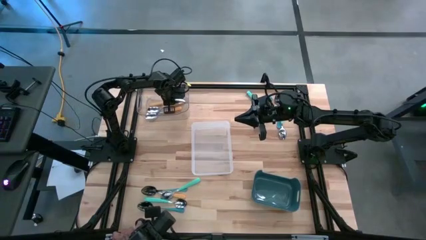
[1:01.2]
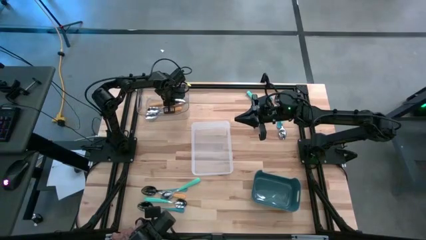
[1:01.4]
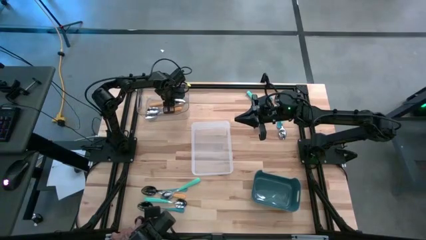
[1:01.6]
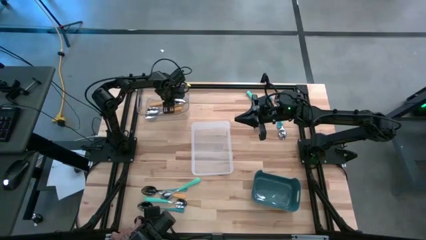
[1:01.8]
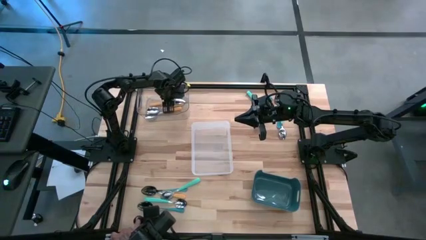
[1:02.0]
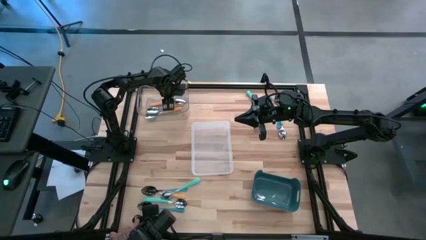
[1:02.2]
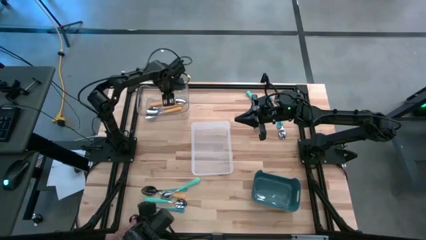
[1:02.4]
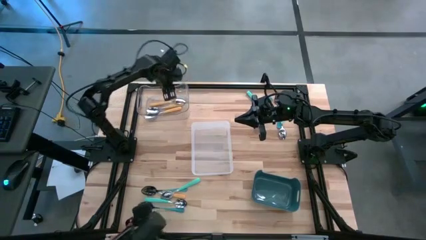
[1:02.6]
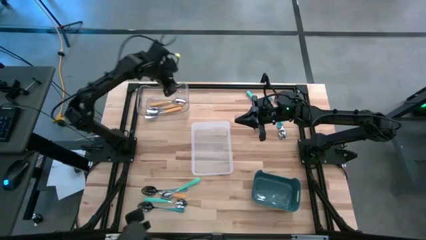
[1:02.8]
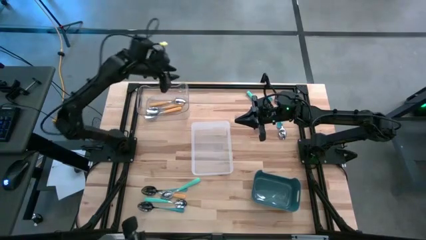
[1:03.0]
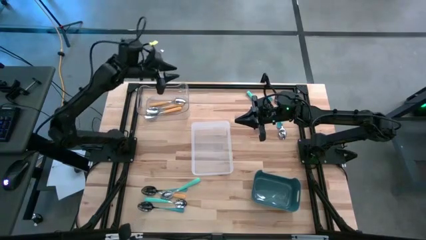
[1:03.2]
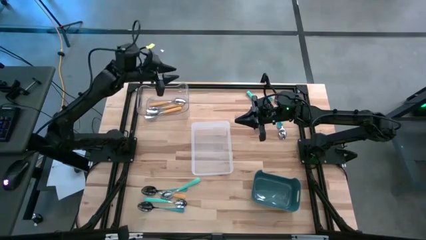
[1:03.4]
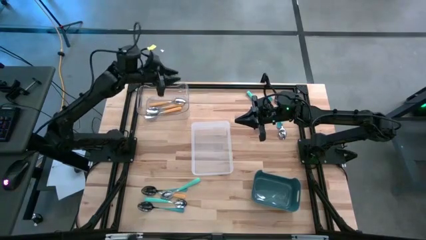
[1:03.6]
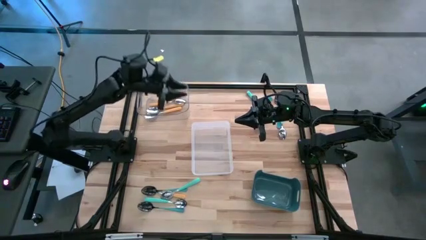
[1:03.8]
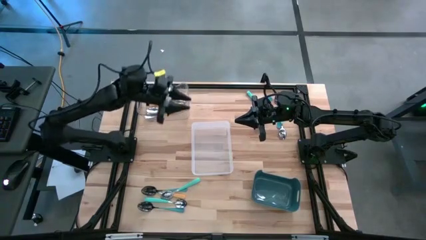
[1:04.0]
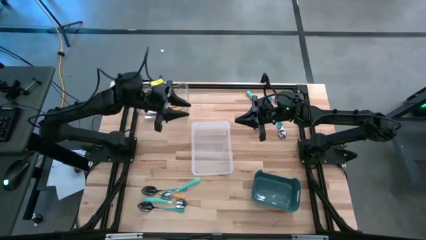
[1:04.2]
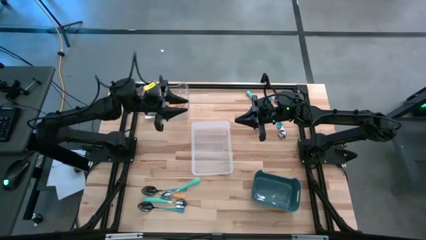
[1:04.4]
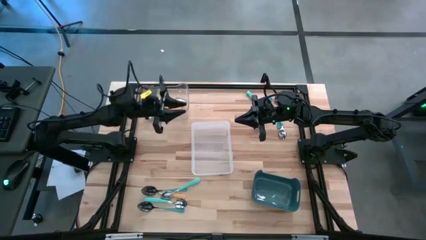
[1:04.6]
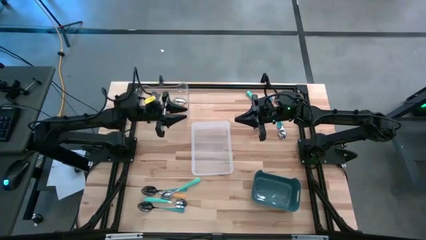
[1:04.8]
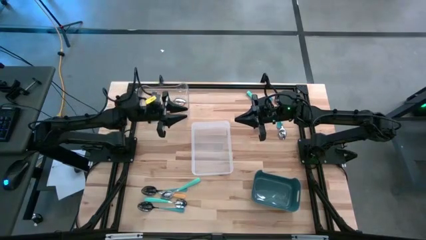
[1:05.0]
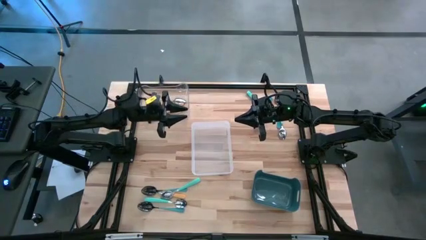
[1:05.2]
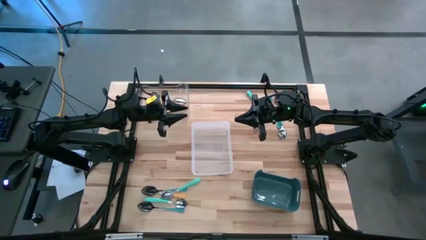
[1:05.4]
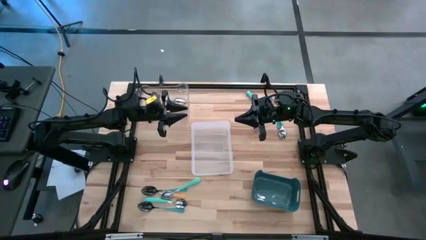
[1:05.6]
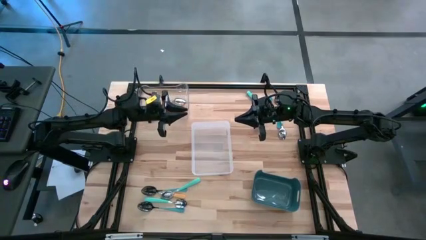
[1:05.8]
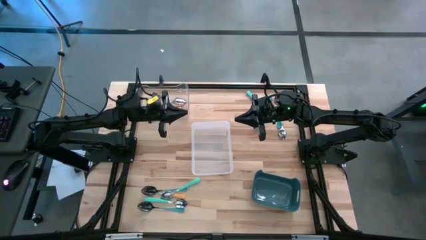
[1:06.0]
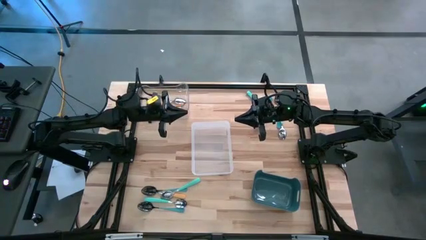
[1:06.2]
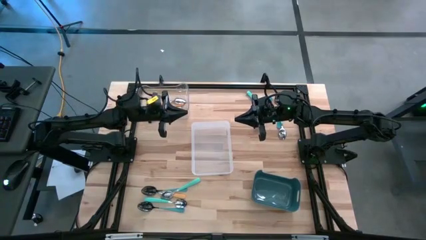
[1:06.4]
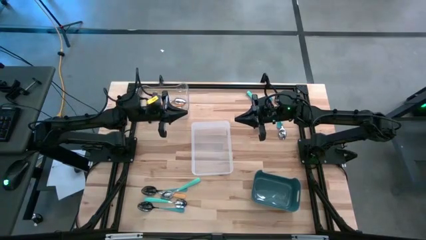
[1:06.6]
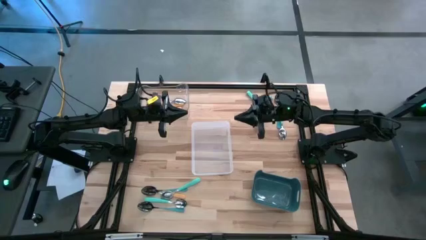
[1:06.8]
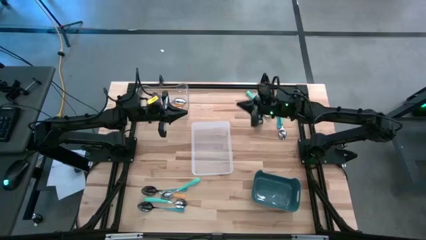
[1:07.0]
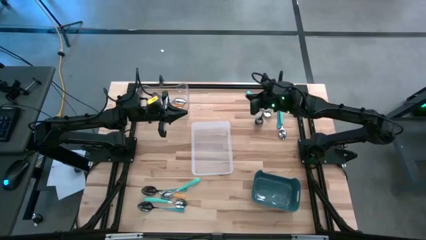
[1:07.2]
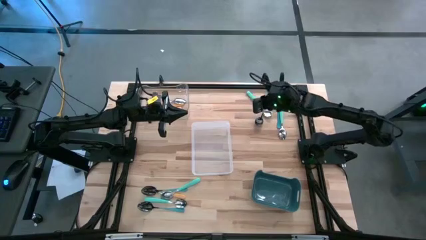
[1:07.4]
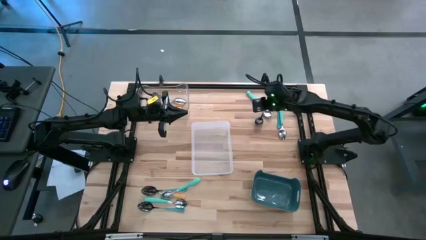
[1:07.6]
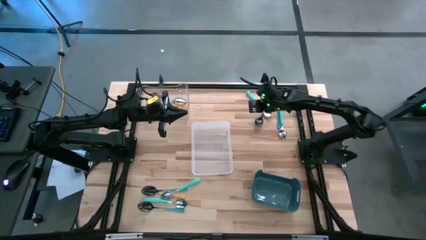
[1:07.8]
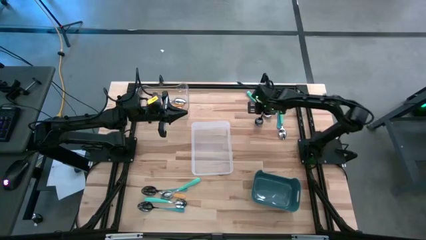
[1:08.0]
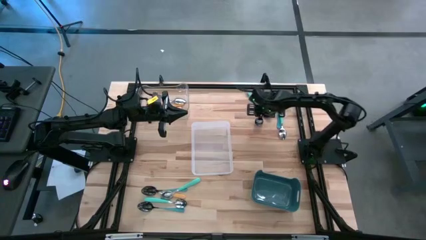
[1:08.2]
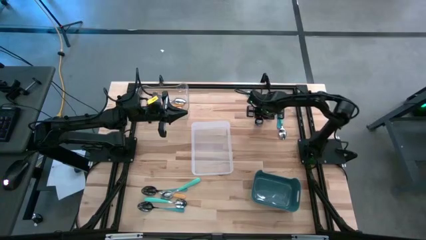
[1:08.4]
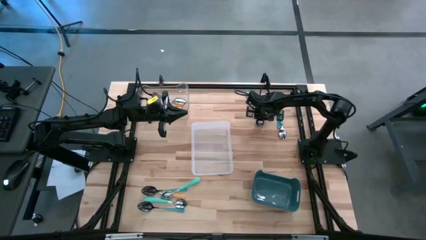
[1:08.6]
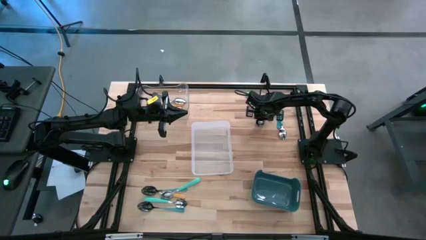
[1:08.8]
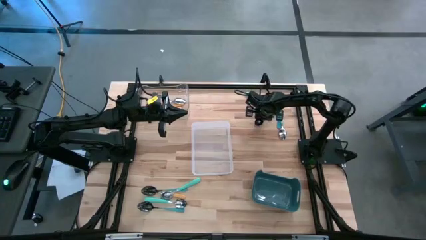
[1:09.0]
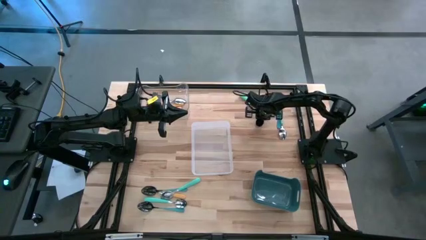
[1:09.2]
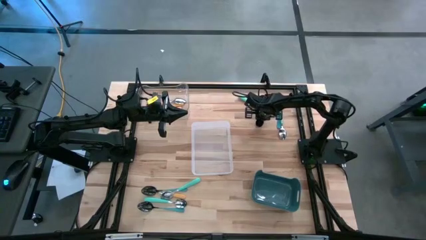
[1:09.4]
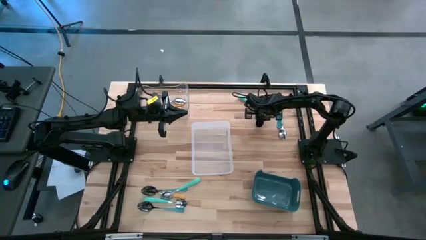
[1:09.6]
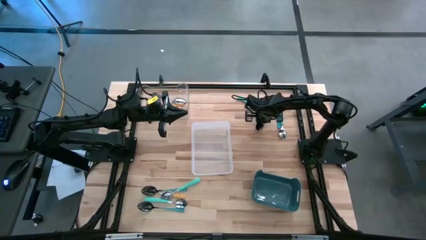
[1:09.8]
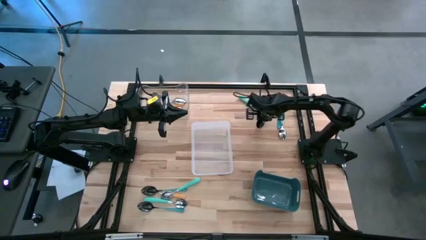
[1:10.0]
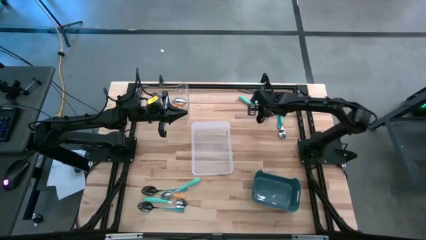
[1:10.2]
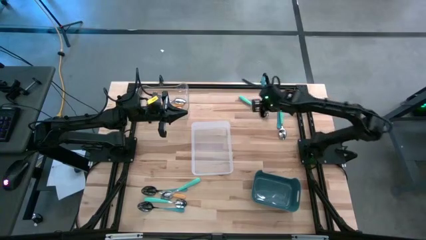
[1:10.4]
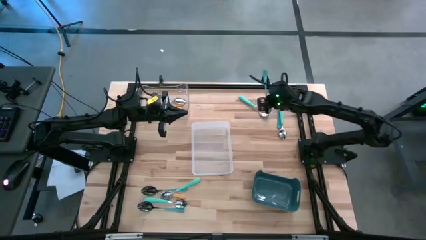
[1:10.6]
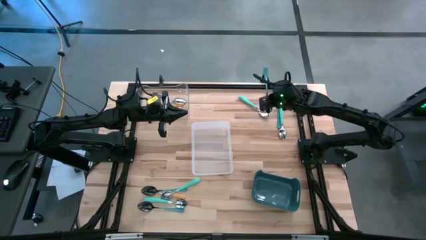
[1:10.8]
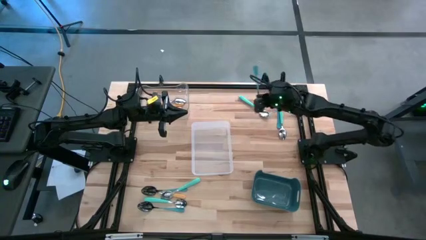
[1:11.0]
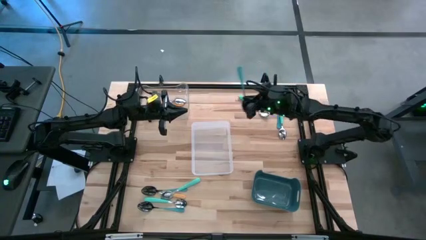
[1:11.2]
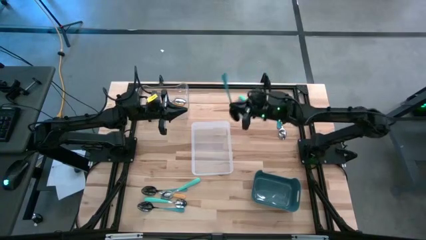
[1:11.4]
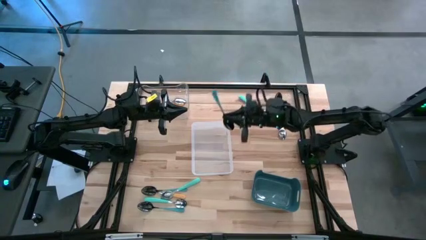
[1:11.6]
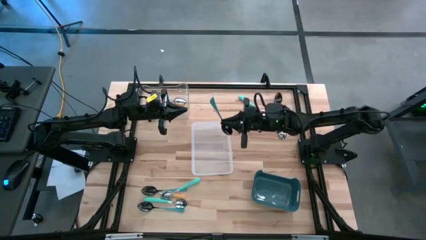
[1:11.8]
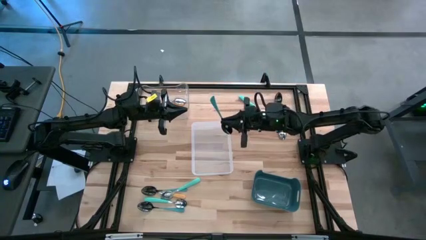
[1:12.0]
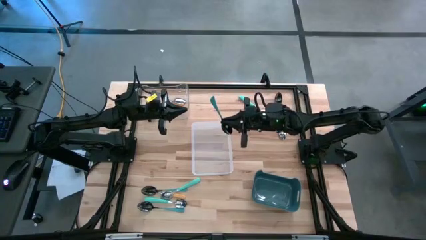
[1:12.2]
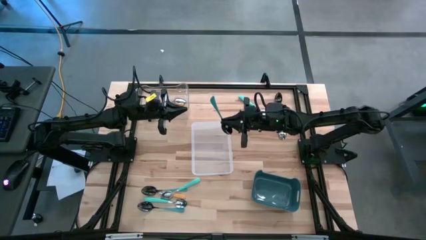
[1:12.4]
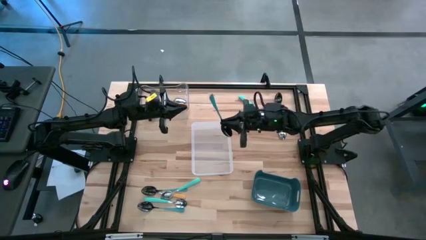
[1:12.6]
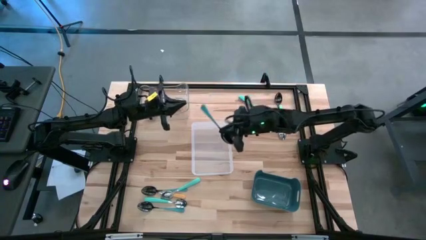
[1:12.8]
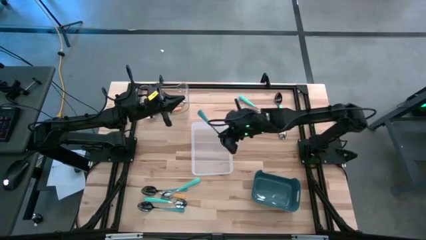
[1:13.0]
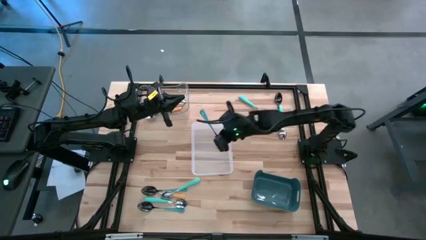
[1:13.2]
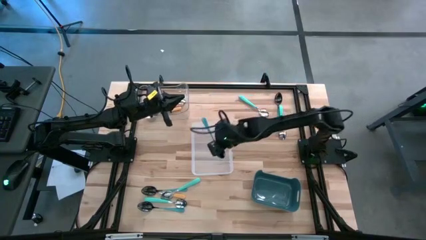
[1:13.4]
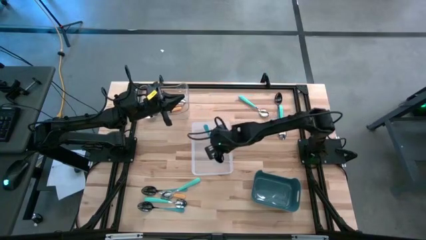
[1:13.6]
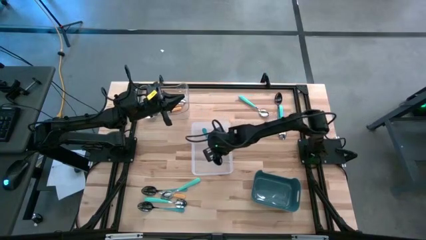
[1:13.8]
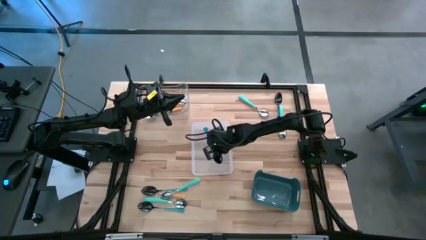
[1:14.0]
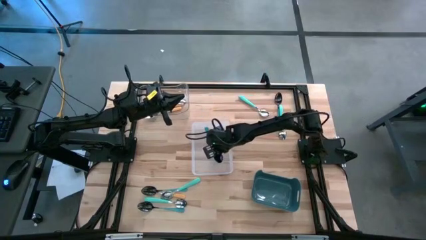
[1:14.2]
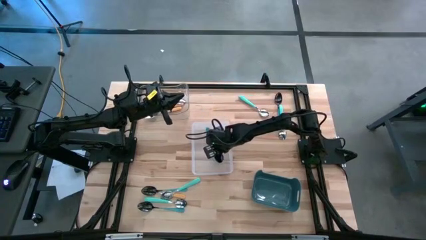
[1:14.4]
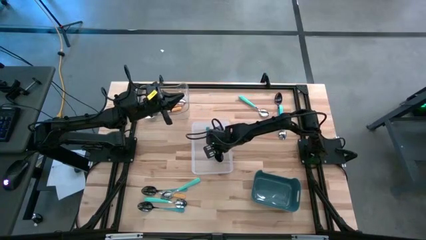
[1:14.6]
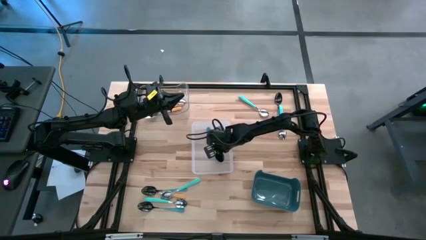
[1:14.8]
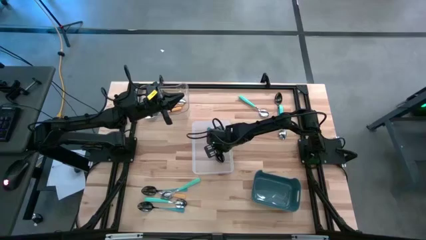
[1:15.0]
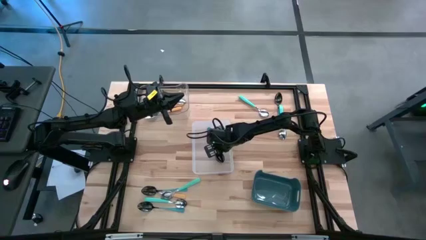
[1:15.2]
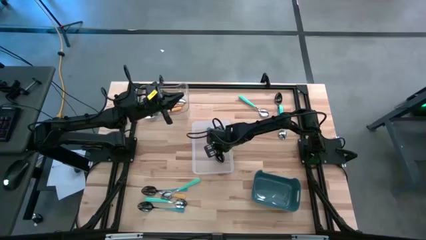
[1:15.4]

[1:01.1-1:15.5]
Task: Sort silverware by color (type)
Put the blue spoon into the white transparent bin
